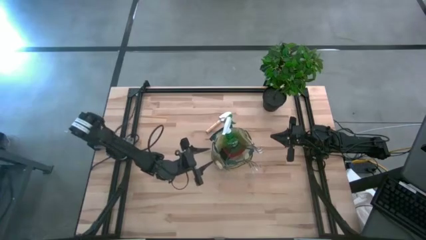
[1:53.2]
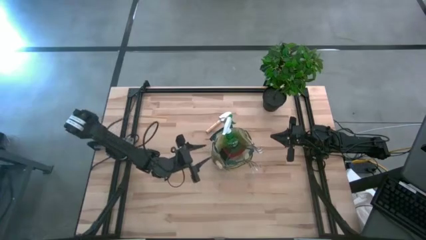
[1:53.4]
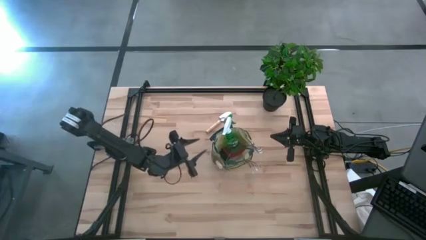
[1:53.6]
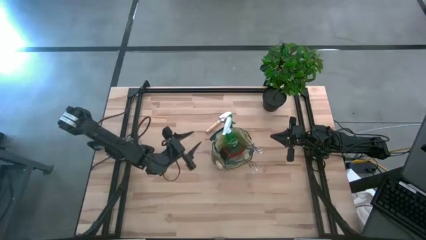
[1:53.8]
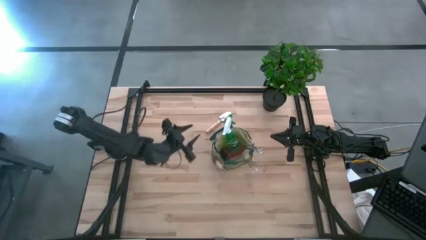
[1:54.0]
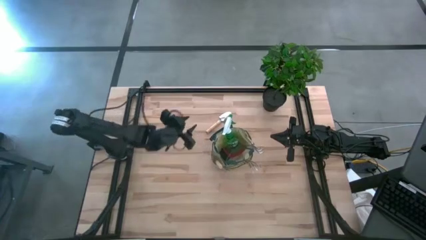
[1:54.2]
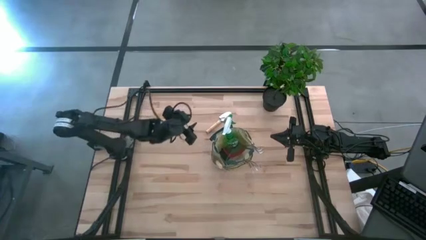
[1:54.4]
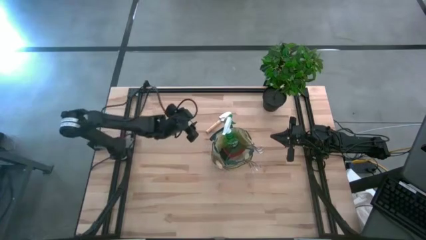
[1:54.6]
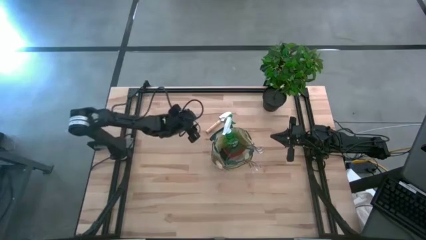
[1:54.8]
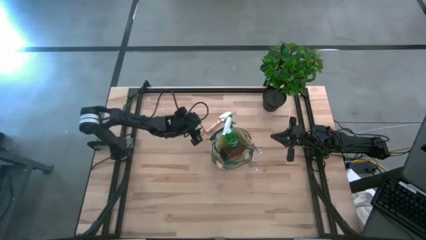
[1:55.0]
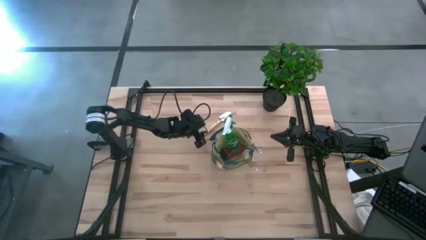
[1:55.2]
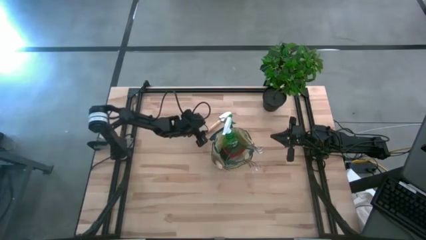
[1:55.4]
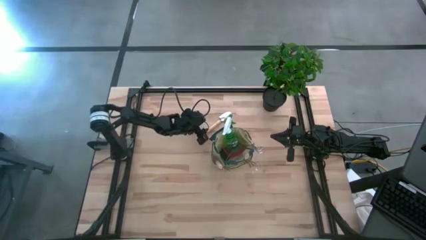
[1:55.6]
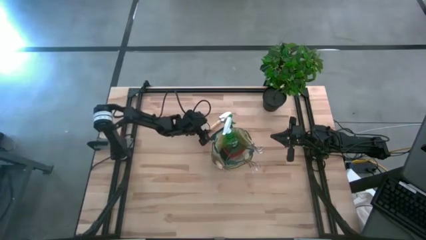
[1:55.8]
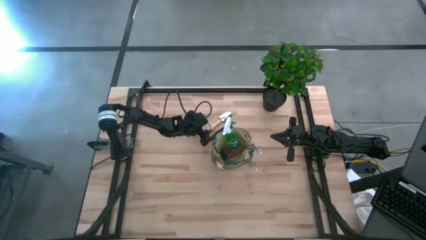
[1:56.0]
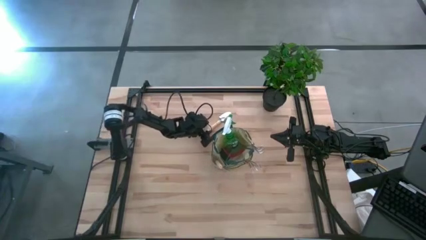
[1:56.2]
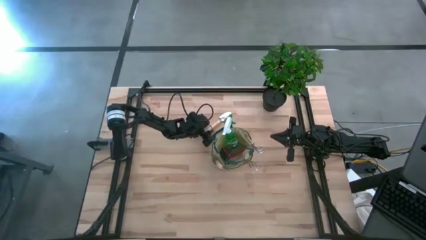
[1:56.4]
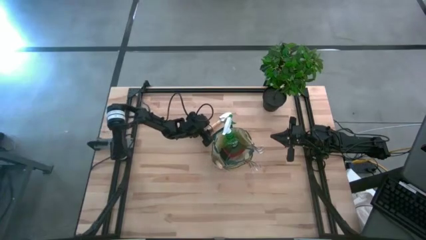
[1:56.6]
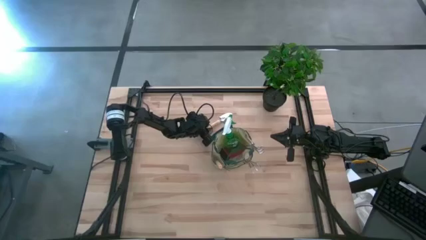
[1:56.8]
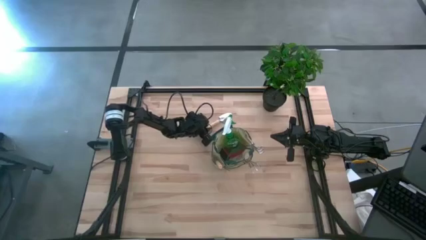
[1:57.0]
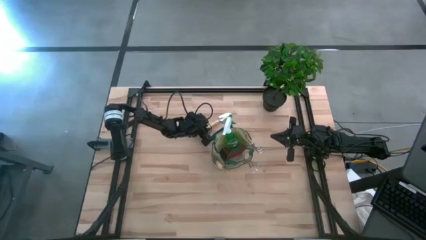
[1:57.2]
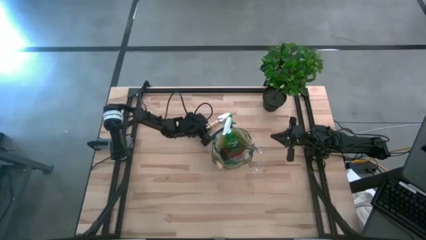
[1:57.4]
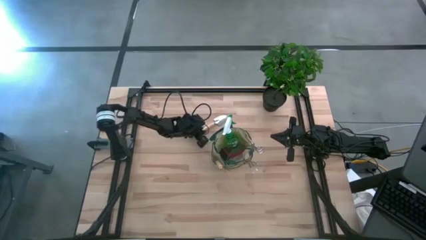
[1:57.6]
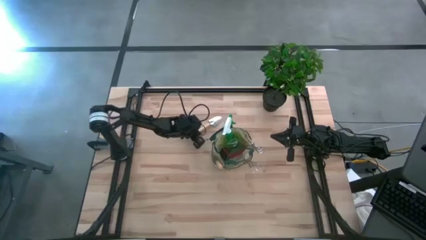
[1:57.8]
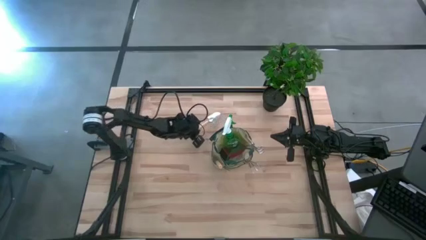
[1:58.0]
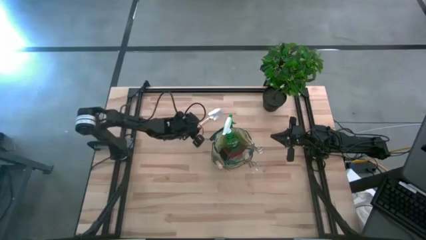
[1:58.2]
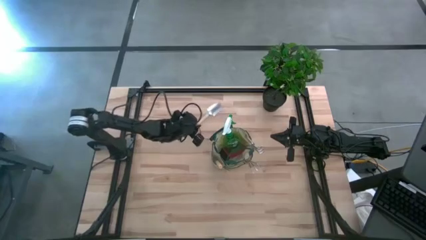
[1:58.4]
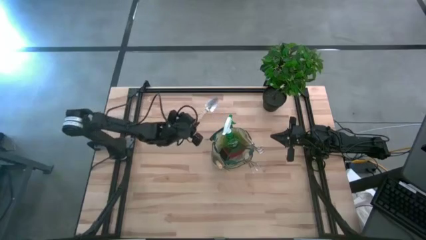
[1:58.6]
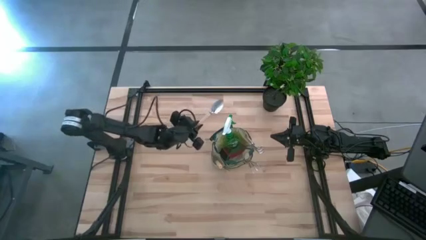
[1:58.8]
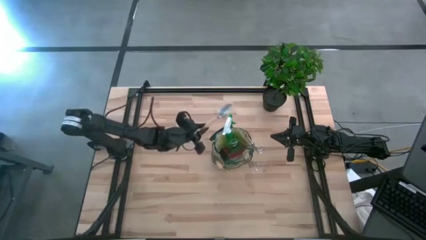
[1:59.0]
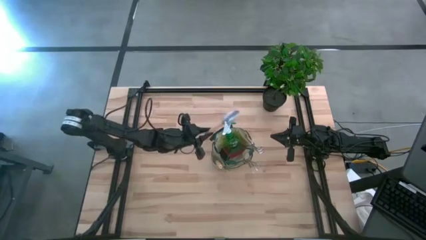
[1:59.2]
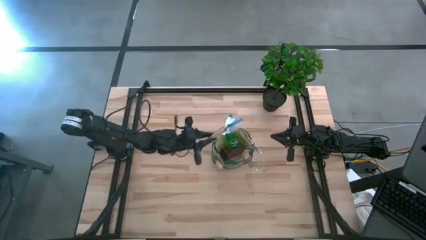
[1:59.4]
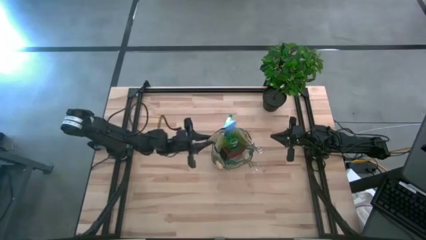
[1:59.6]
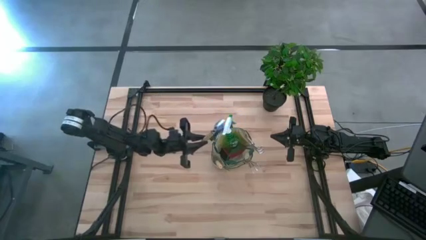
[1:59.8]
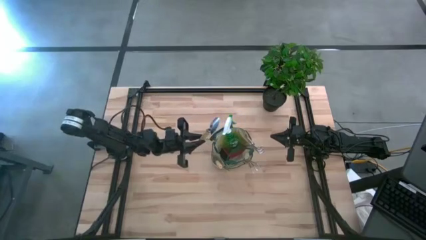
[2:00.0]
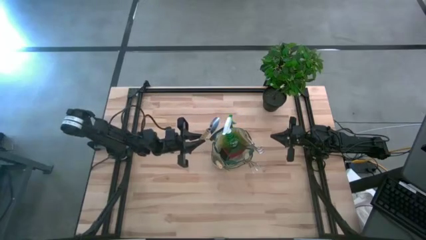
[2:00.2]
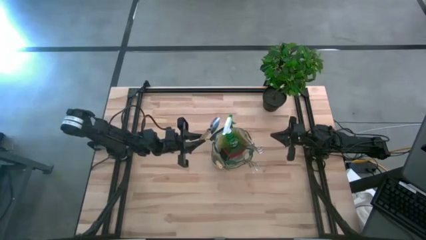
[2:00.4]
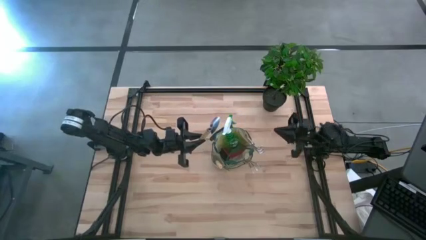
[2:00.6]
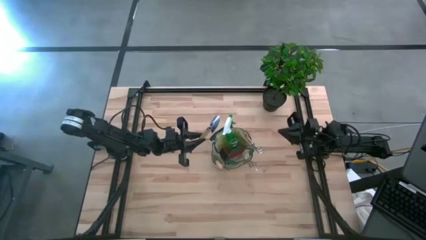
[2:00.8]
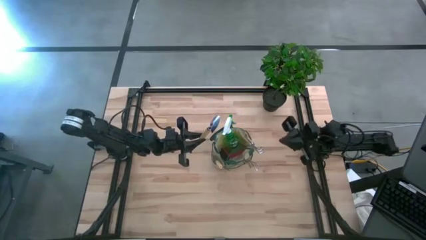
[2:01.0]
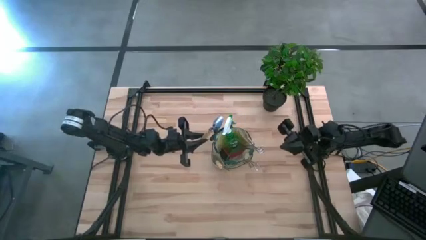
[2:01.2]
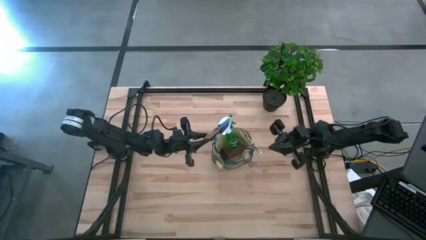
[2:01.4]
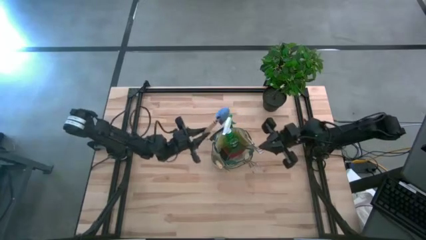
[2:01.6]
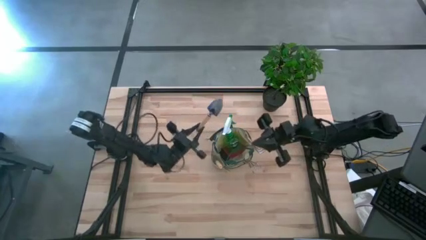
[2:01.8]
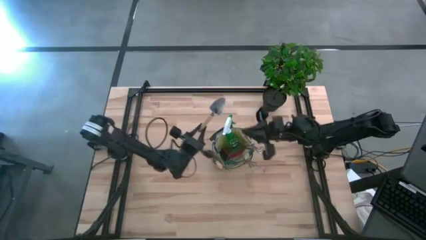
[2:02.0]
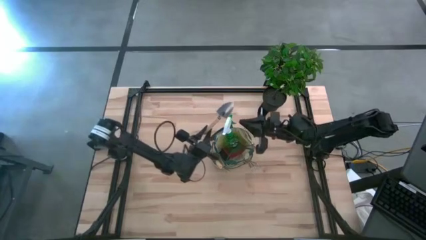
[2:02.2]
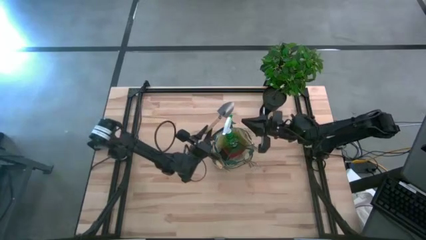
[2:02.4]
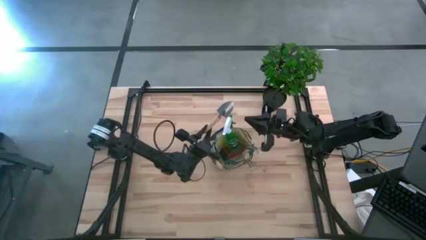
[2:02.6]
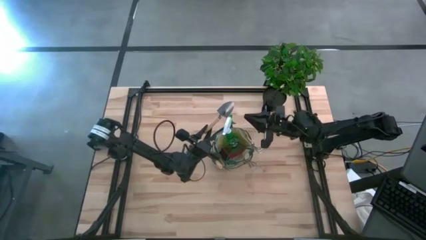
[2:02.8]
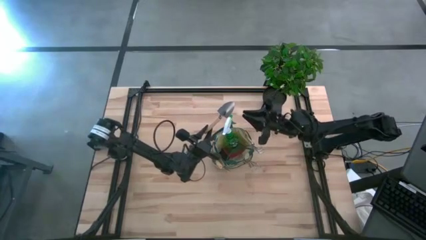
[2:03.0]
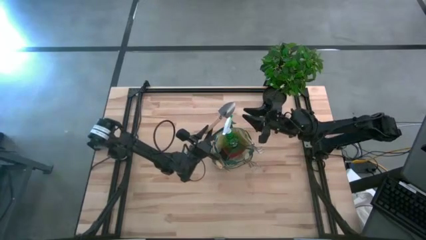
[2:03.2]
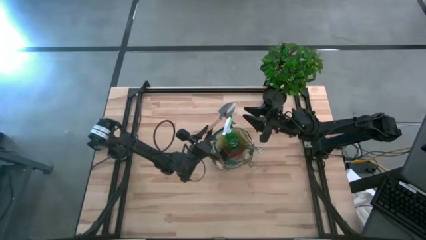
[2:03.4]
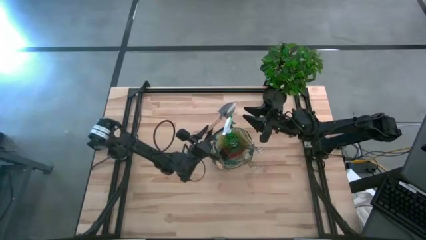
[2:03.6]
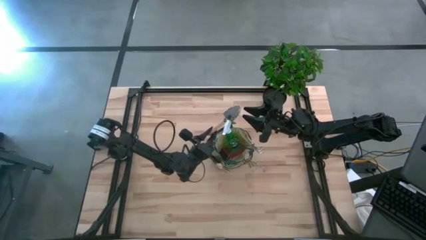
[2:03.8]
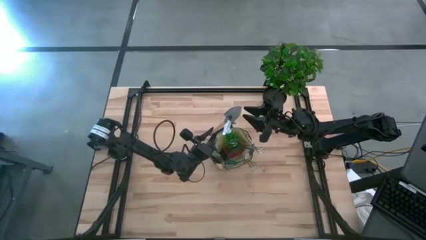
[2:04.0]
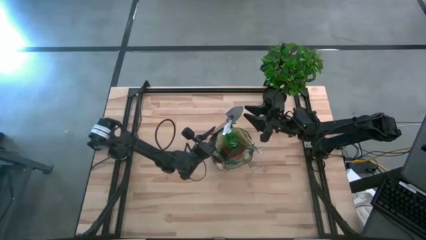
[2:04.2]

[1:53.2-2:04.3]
Task: Pick & Place Garden tools in Gardening bag
Put the brown trowel into the green gardening bag
